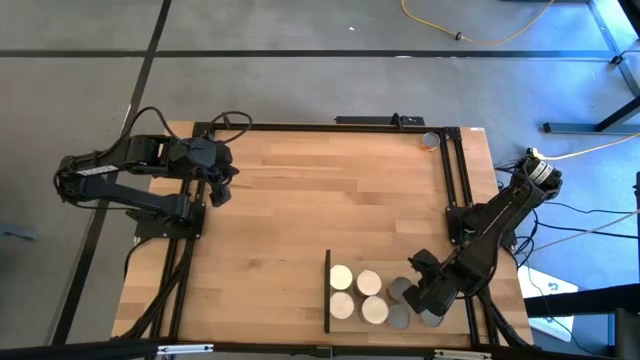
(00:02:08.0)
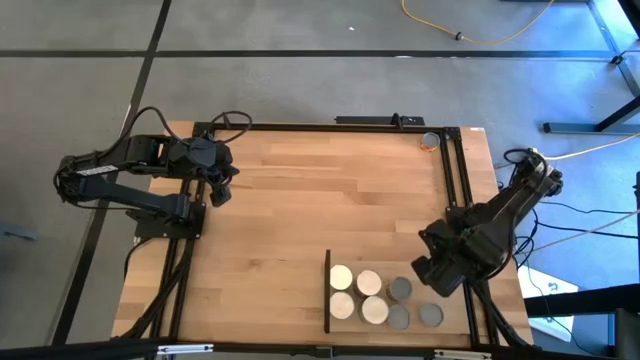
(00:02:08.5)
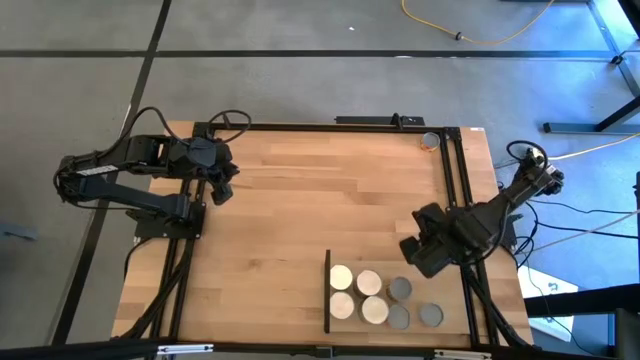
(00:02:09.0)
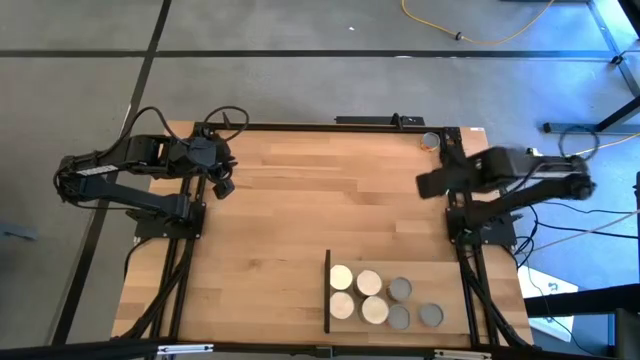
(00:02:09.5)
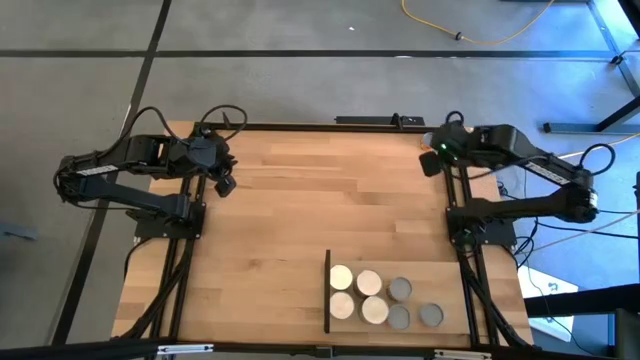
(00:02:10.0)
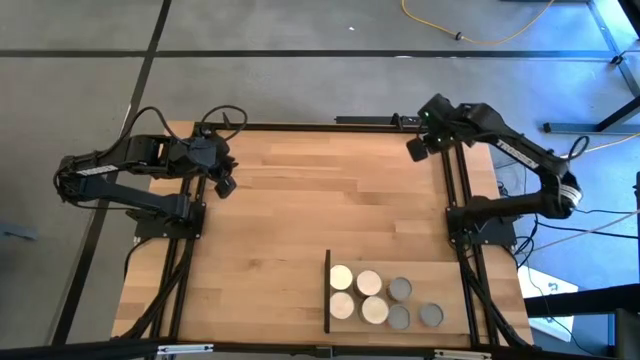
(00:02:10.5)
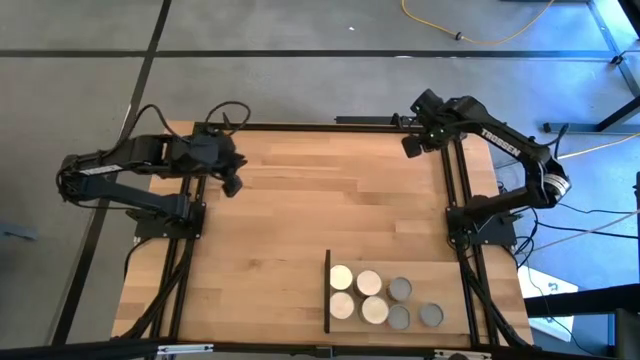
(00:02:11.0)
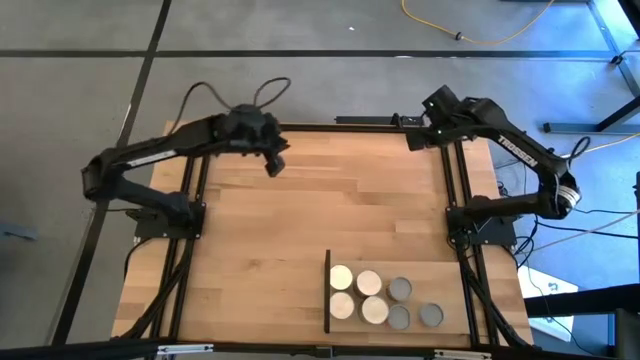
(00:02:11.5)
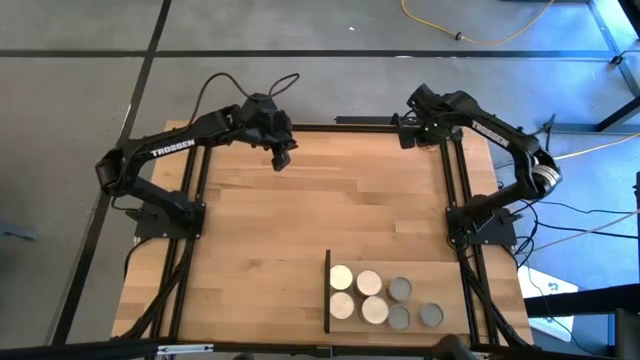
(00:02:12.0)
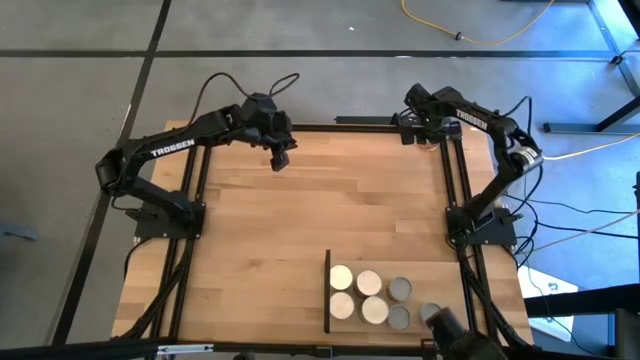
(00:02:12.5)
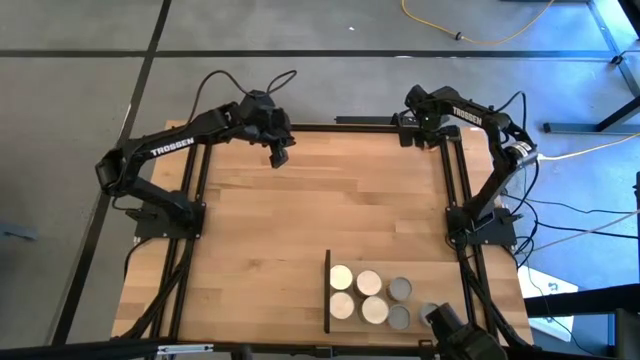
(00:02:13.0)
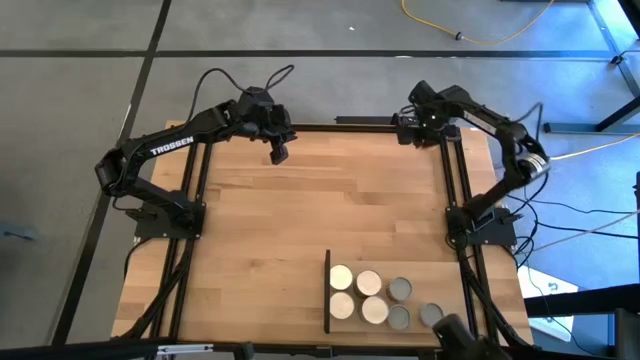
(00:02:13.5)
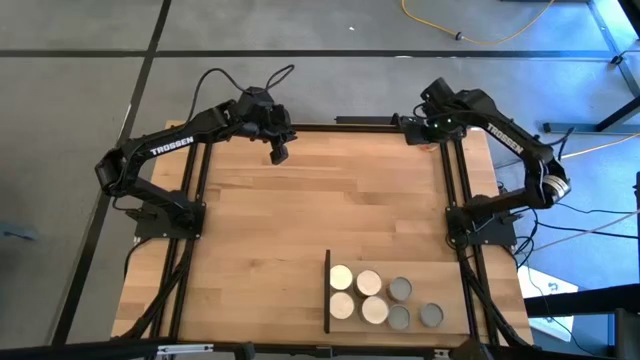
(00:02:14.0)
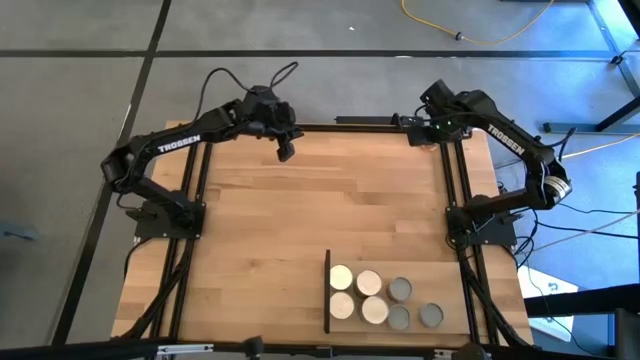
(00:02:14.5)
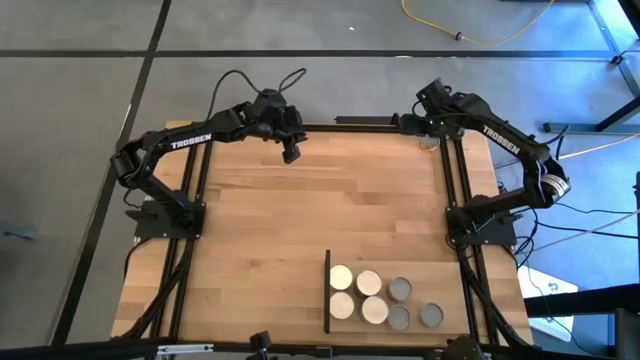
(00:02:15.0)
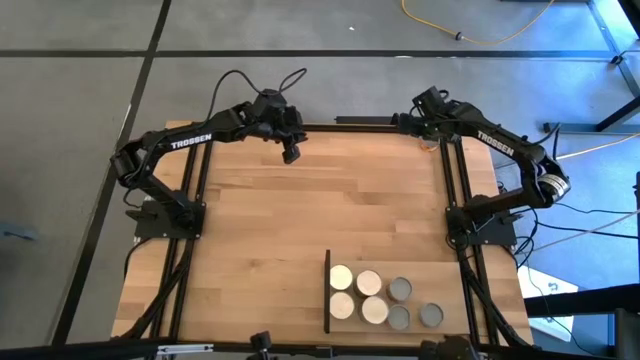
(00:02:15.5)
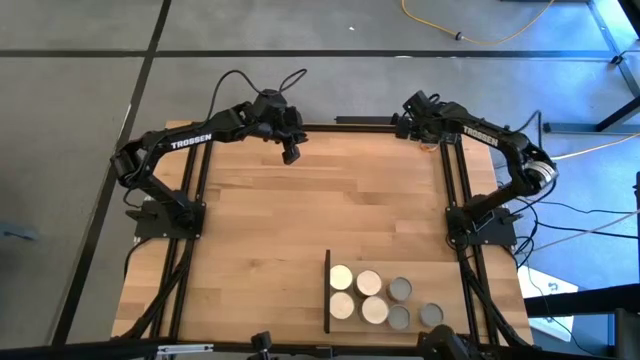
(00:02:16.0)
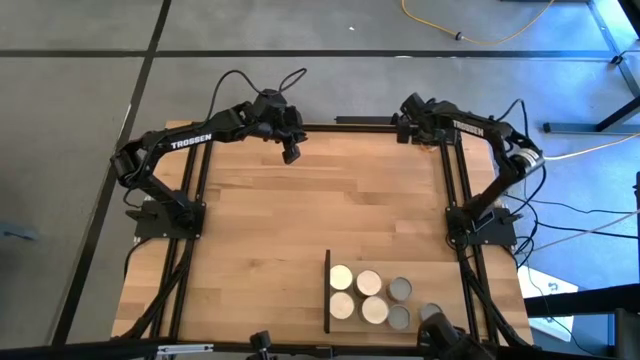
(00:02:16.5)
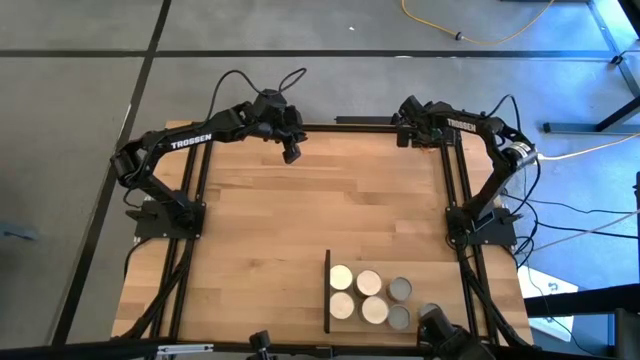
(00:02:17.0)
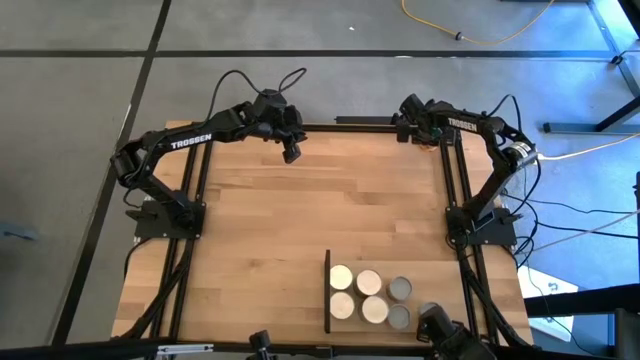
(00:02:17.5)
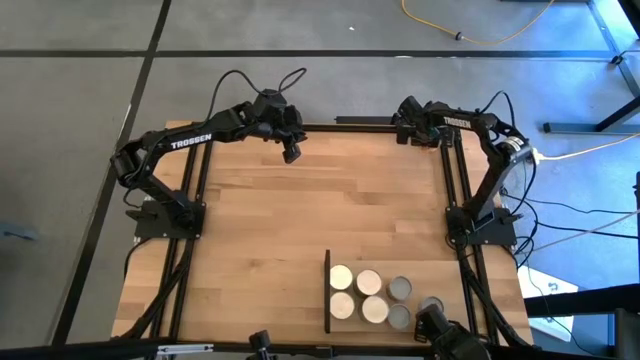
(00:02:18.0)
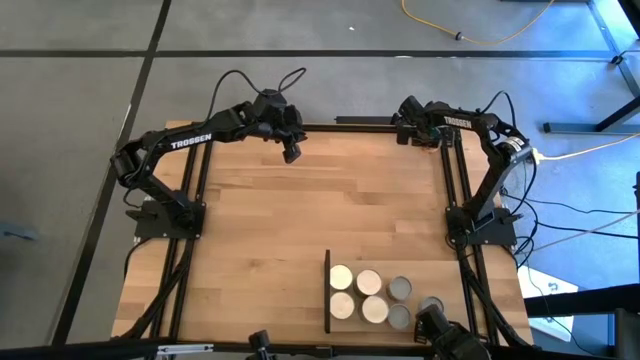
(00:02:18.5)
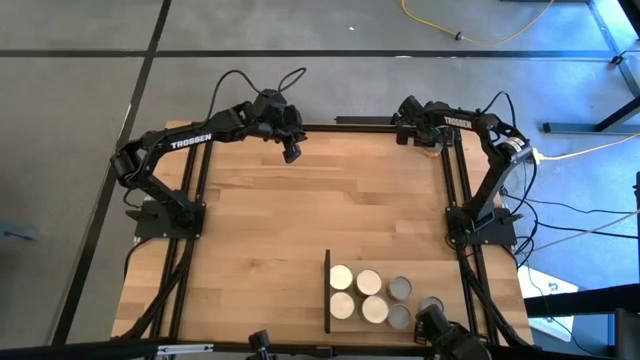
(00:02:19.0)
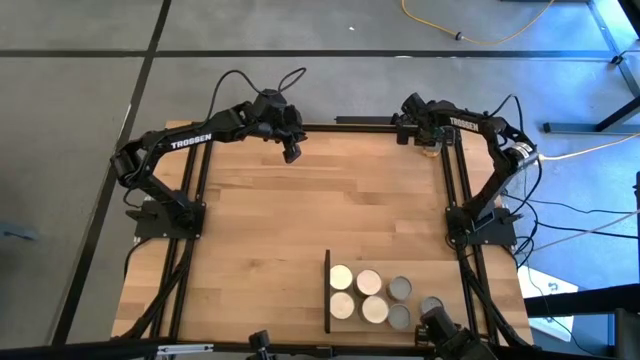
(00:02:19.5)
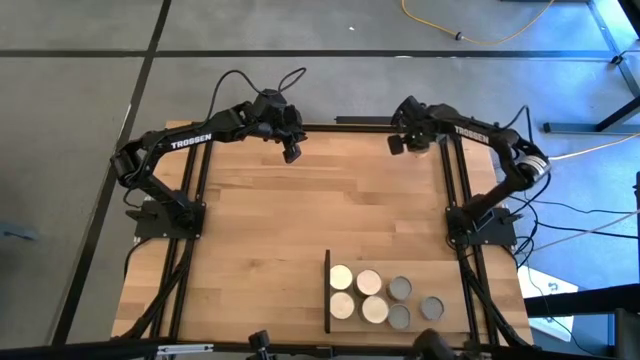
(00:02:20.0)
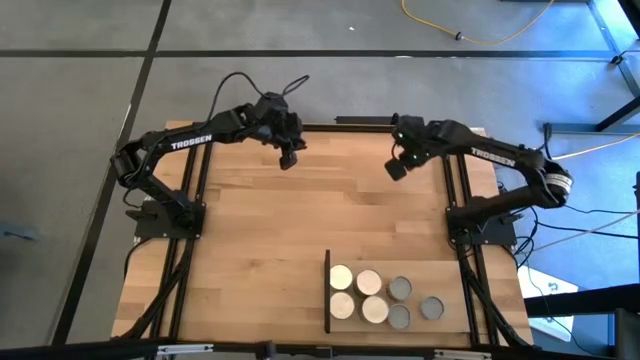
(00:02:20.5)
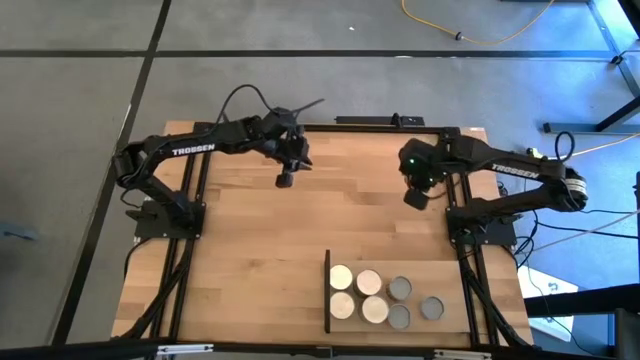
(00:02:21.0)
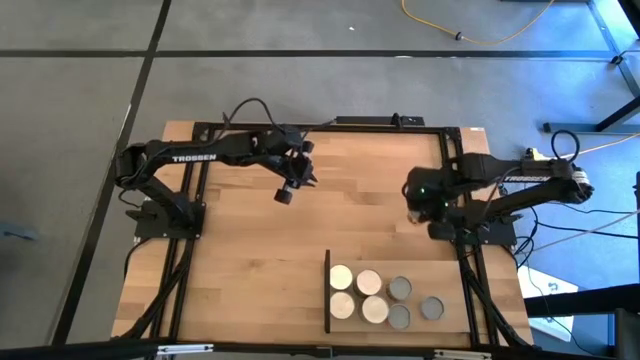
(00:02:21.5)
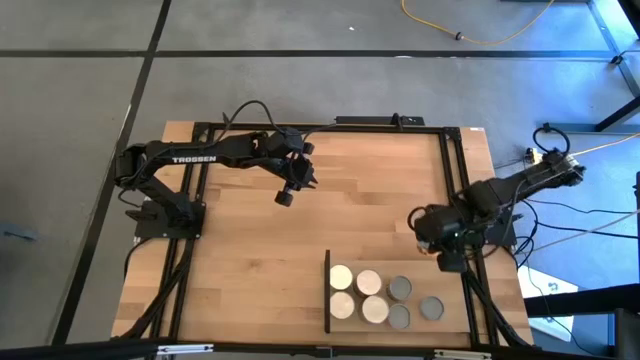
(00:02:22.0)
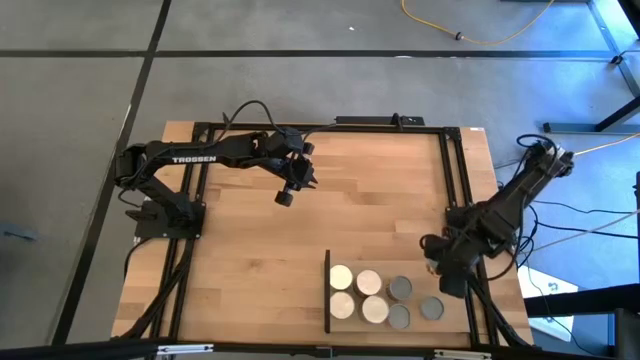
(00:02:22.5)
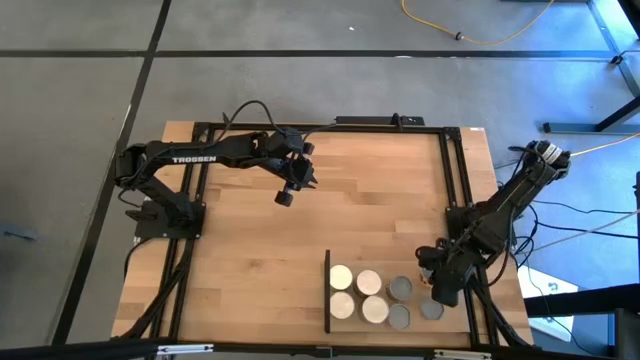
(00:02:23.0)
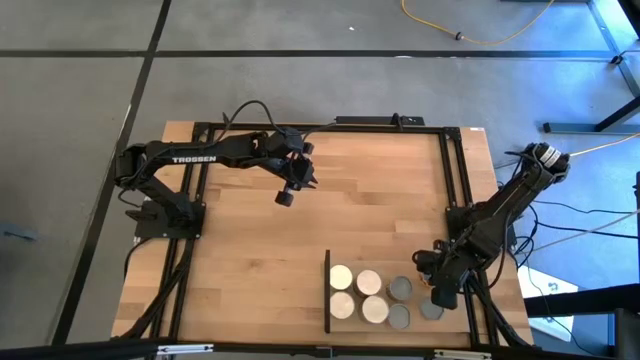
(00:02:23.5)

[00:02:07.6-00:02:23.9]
Task: Pick and place cans onto a shelf
Put the canned pineapple rings on the shelf

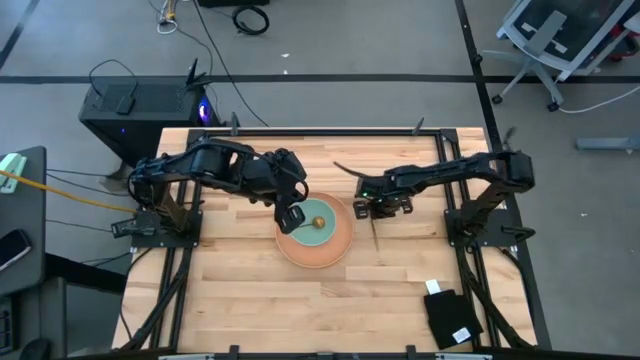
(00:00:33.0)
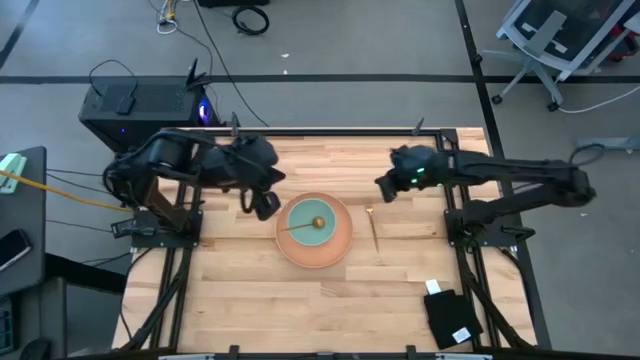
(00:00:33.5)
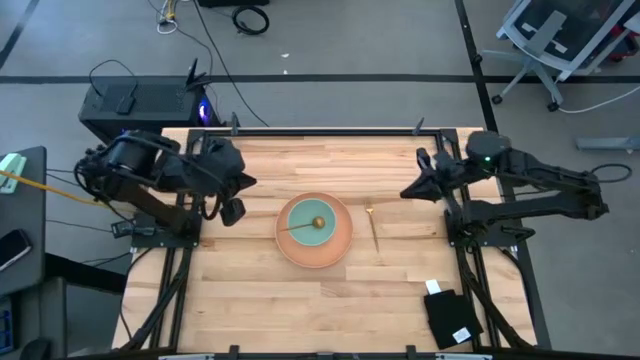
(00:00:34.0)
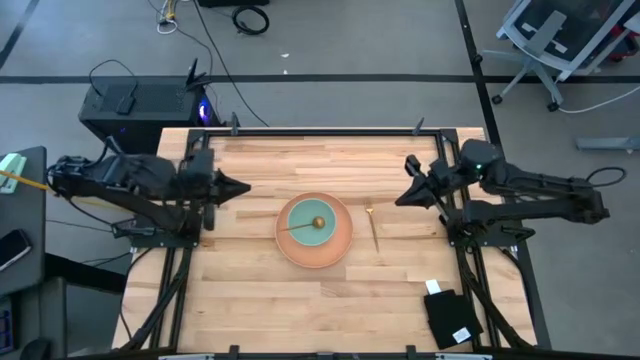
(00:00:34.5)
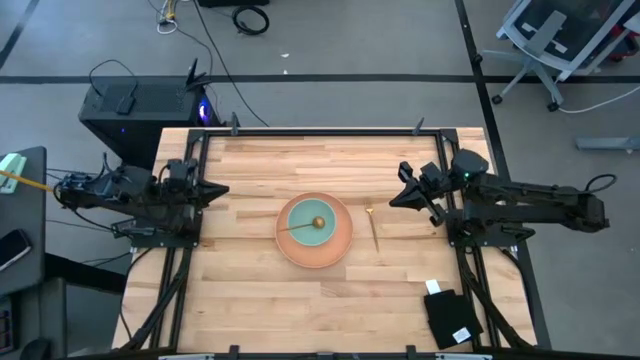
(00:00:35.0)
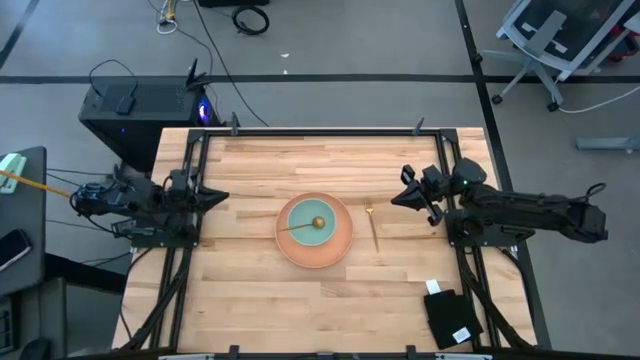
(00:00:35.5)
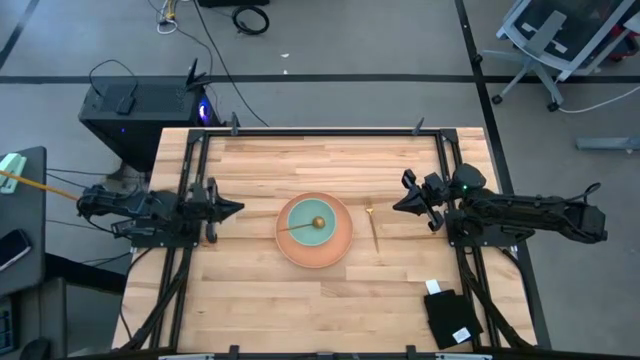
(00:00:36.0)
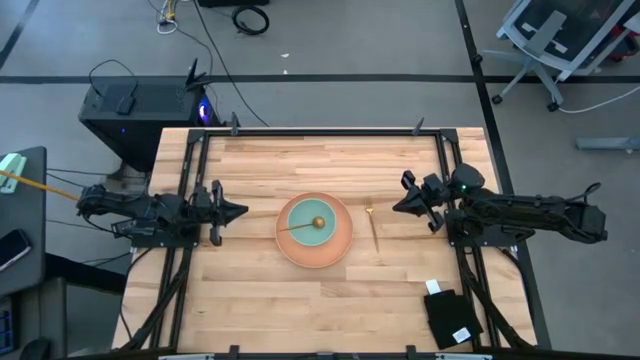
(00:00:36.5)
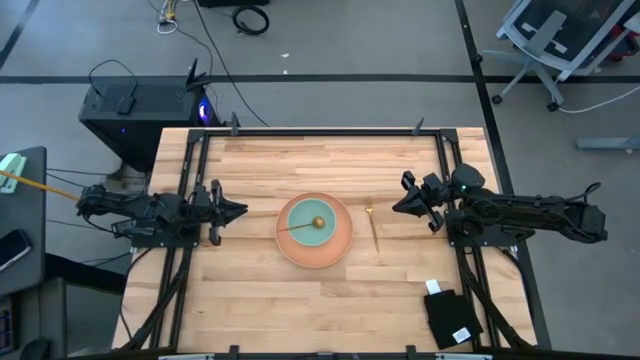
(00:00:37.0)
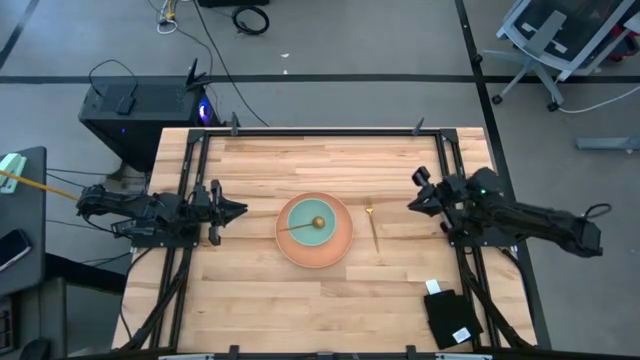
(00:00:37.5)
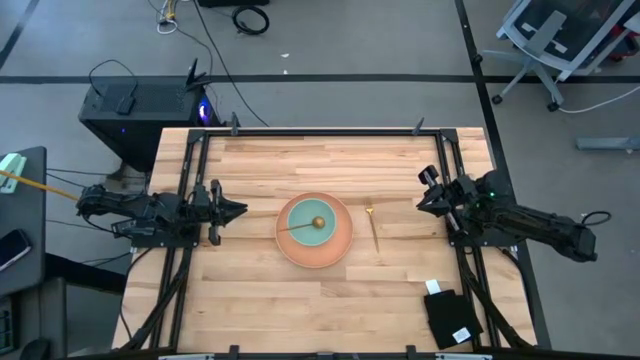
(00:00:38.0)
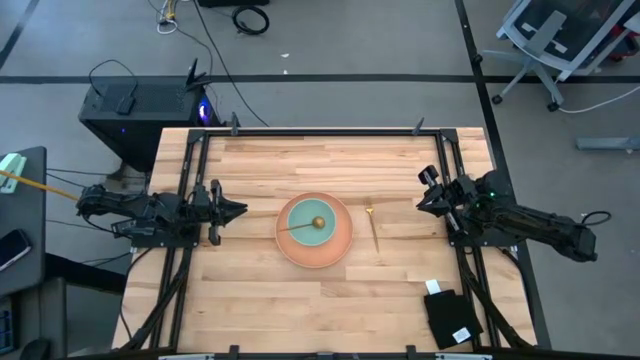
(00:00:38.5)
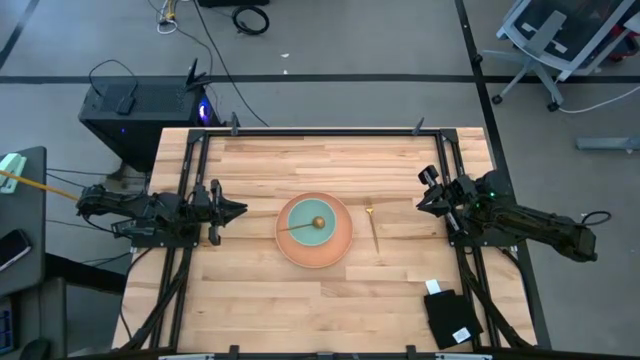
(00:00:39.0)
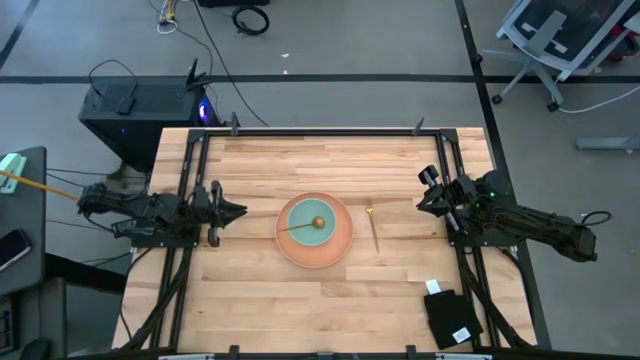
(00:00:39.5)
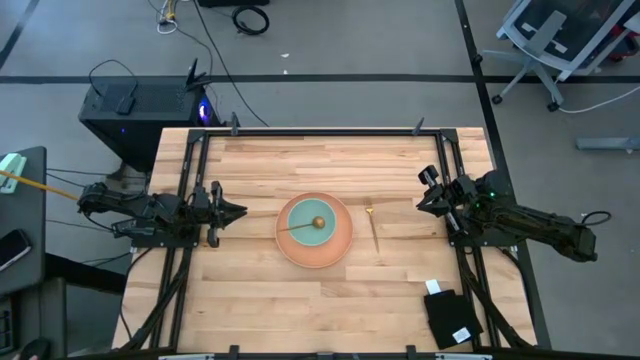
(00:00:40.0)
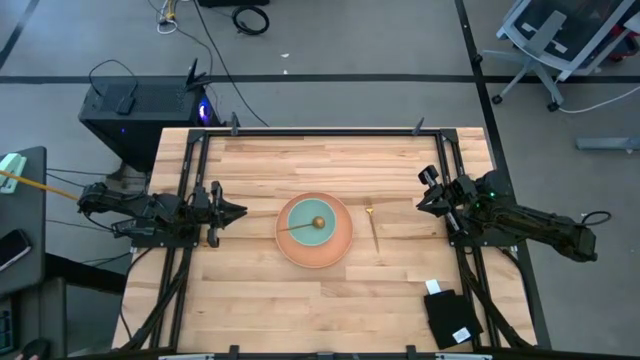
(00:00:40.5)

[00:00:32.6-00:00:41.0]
Task: Set table place
Return to Home Position
